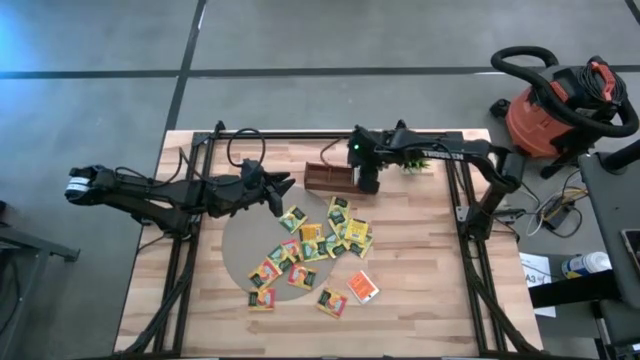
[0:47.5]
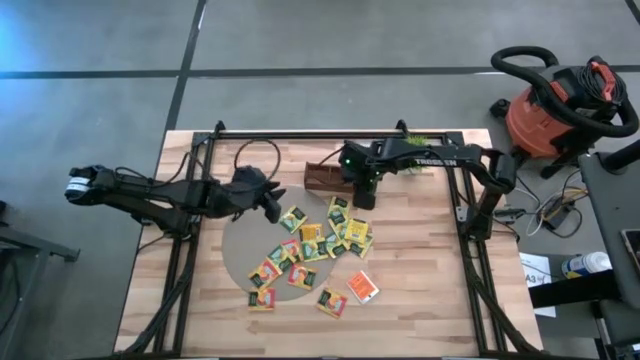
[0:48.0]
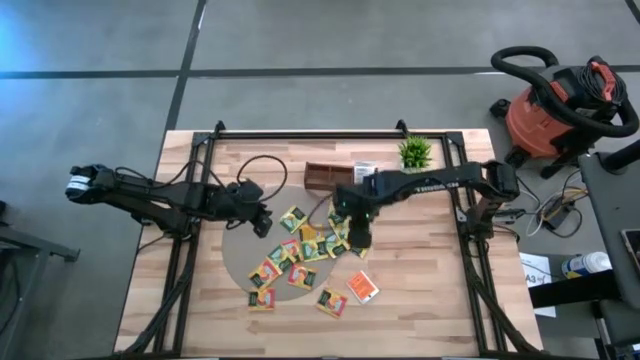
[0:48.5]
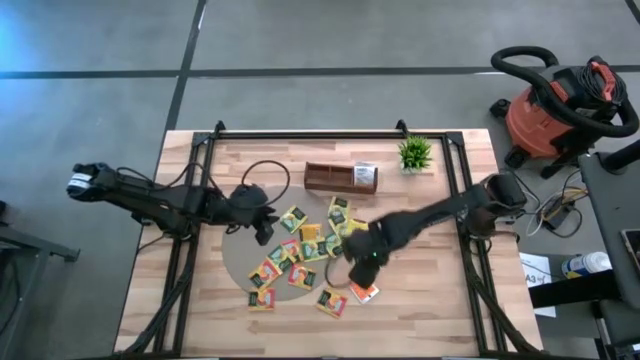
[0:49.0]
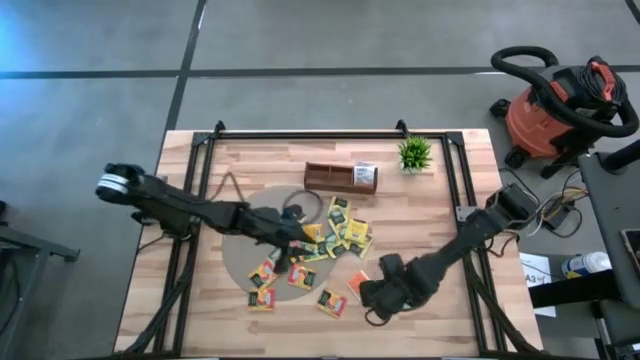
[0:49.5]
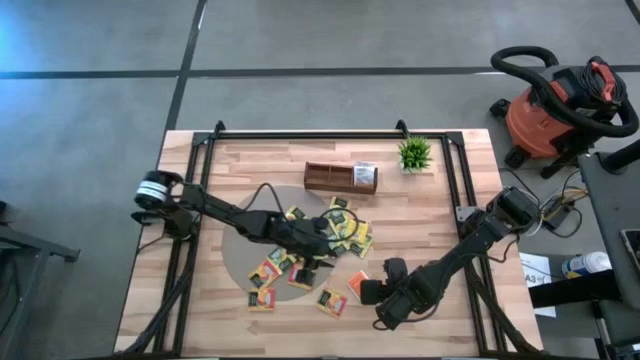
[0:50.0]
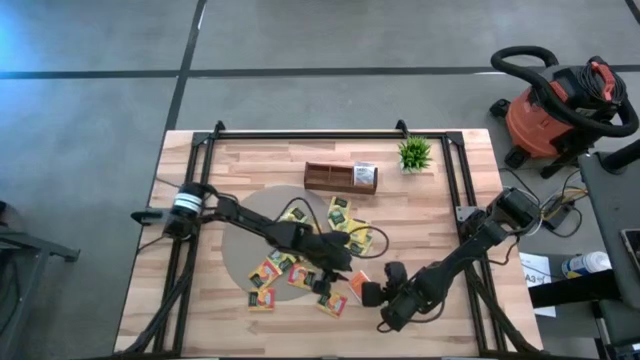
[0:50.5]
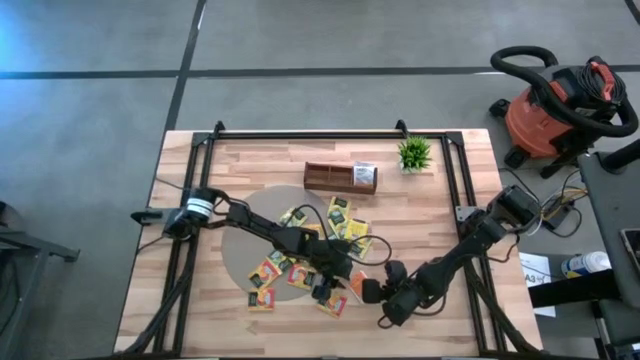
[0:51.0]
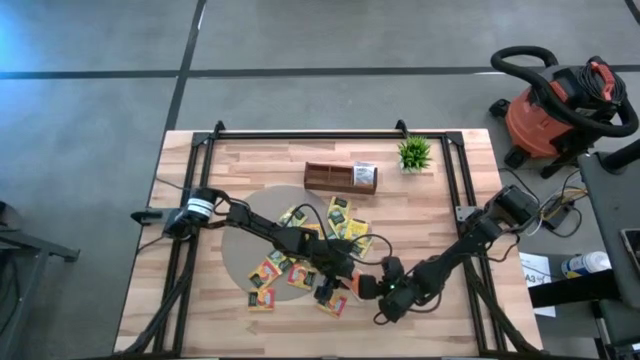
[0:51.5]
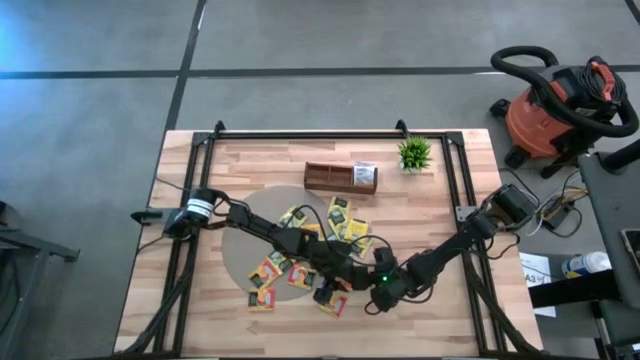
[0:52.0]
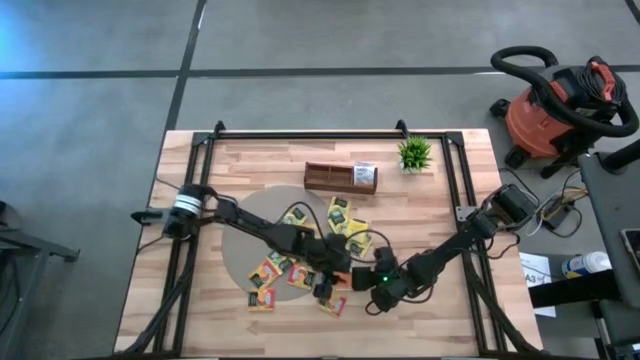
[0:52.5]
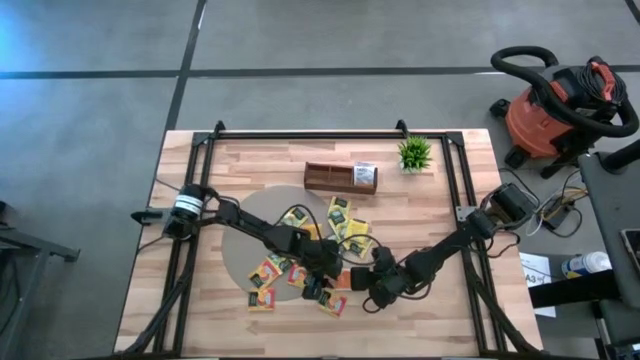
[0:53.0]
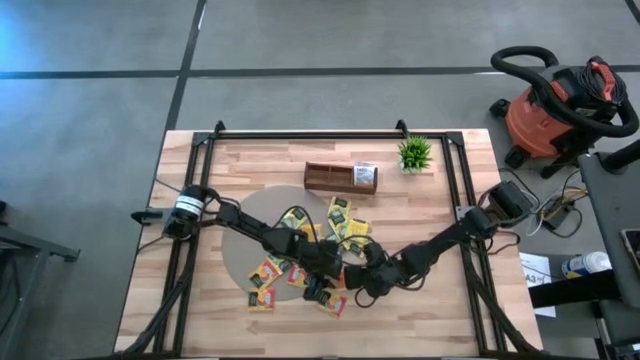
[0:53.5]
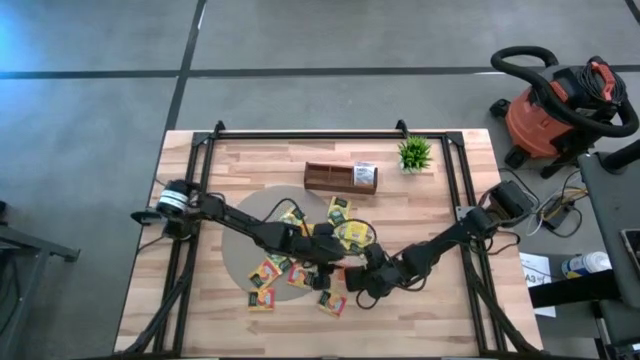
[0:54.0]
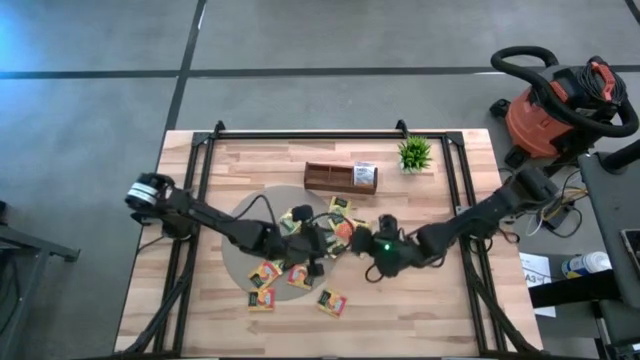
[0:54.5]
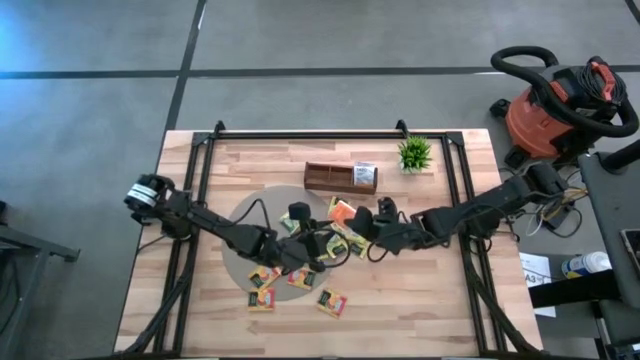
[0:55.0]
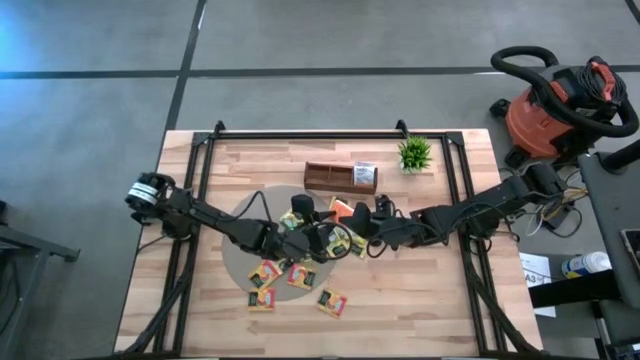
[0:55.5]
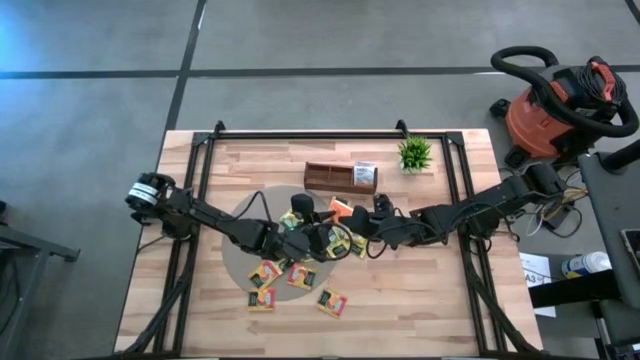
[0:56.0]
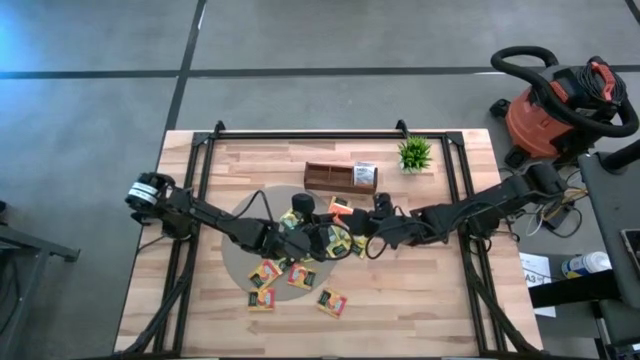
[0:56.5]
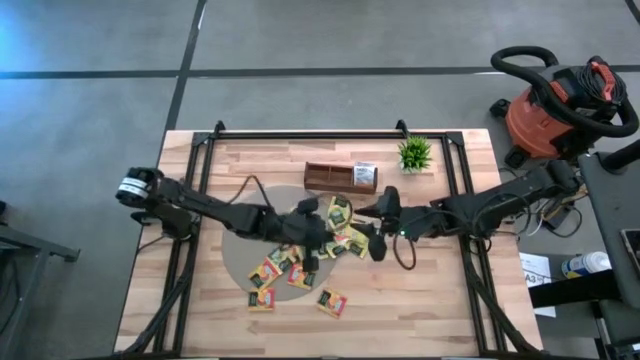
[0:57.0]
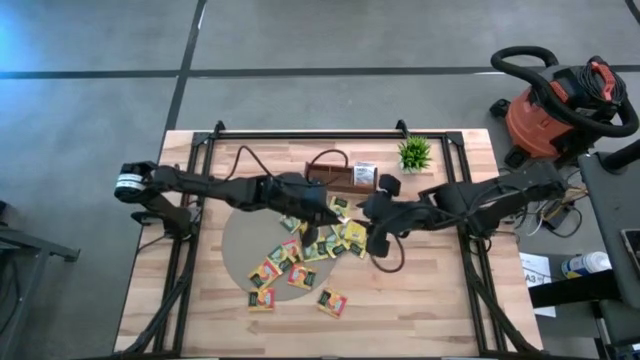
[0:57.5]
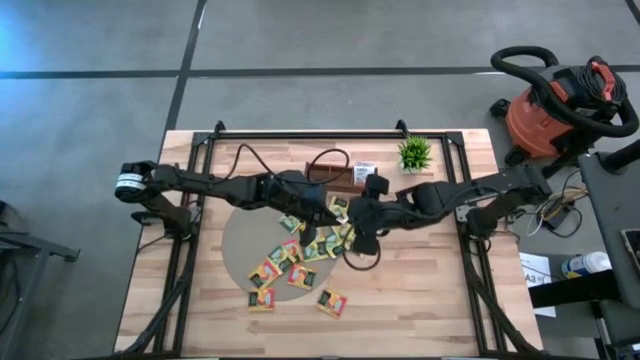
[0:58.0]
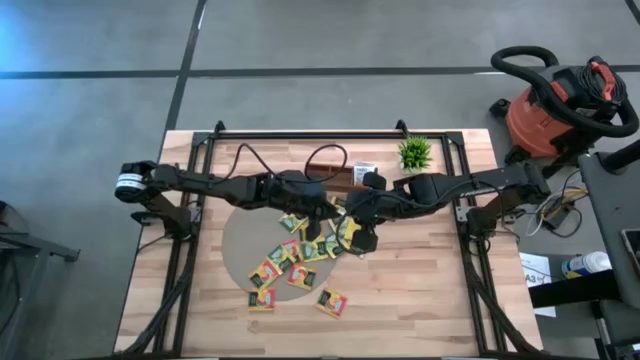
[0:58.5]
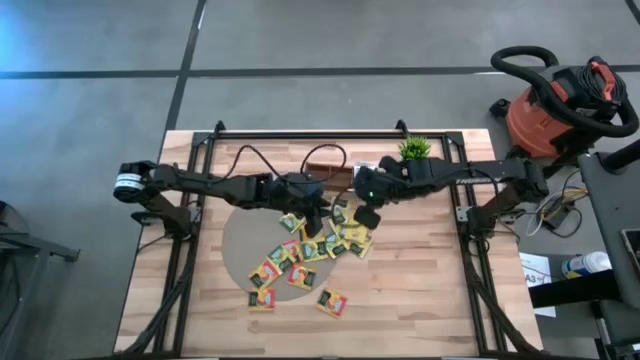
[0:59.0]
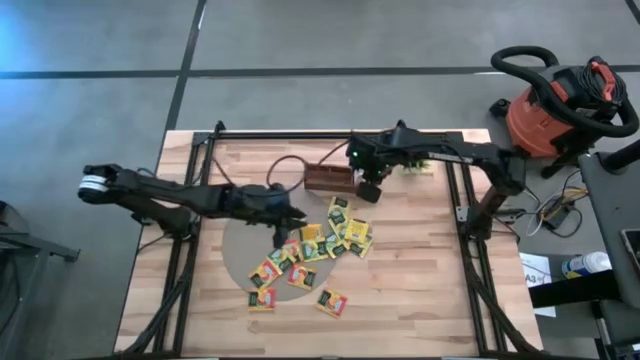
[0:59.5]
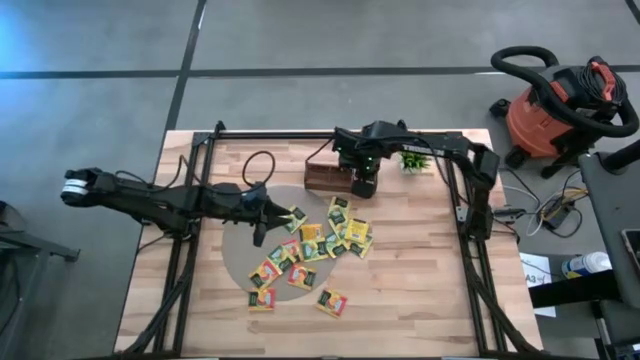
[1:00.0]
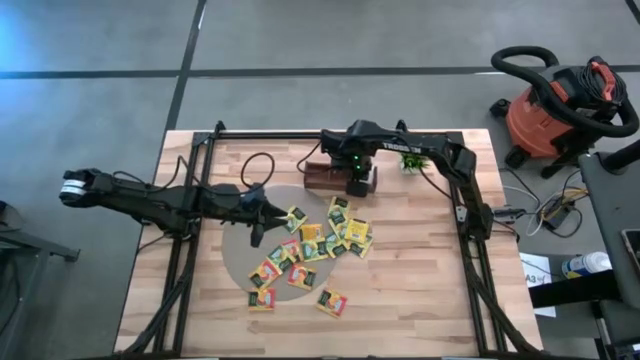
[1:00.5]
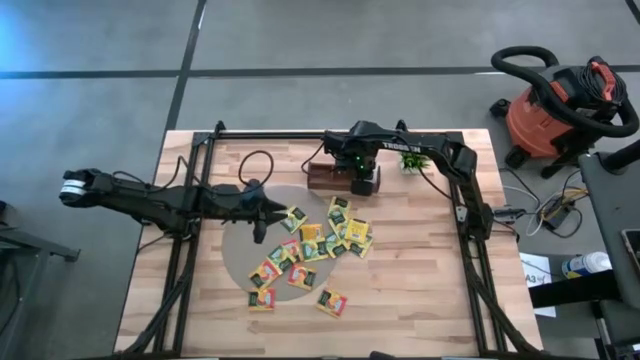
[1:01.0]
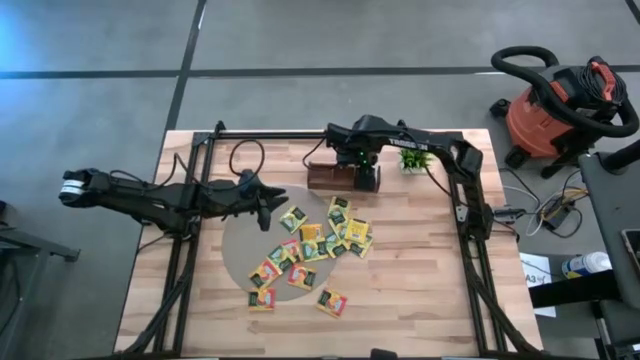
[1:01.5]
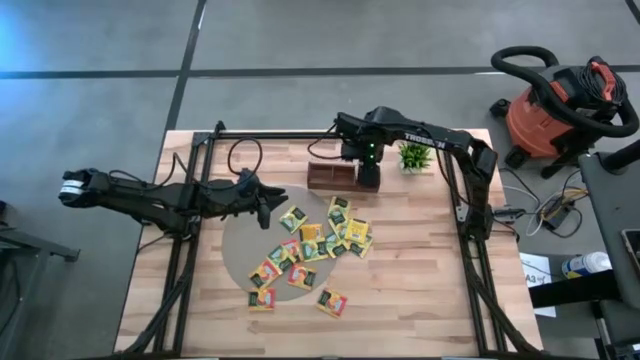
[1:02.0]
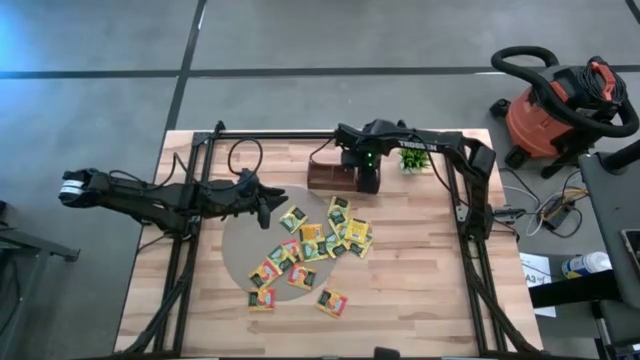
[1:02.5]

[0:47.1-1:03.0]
Task: Pick & Place Tea
Put the orange tea sachet into the right compartment of the wooden organizer

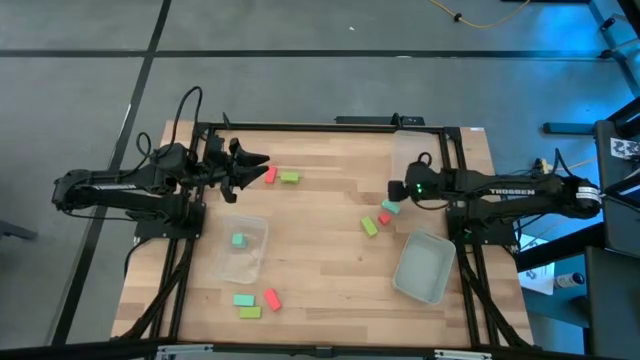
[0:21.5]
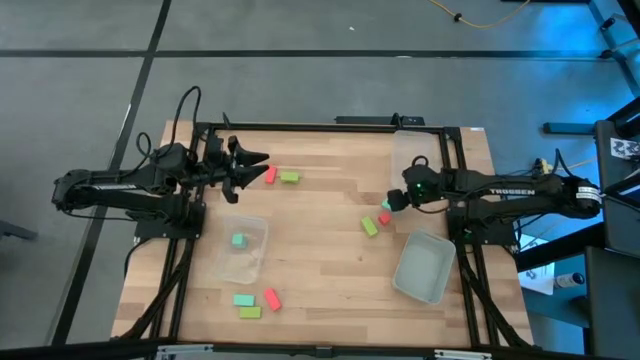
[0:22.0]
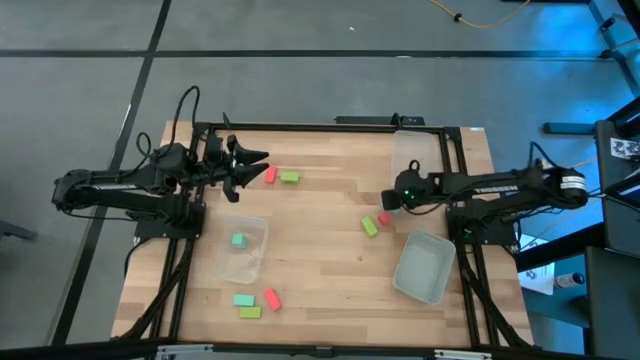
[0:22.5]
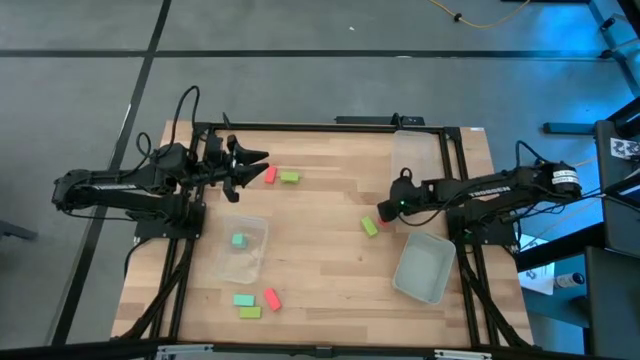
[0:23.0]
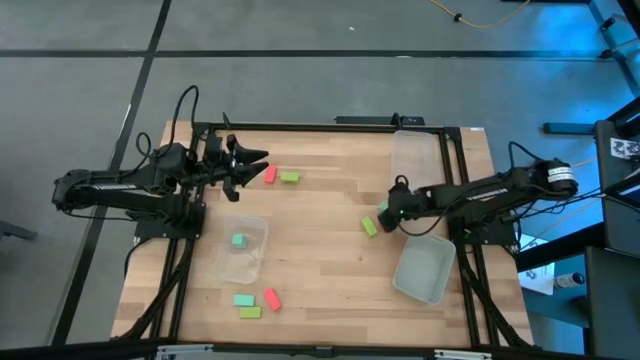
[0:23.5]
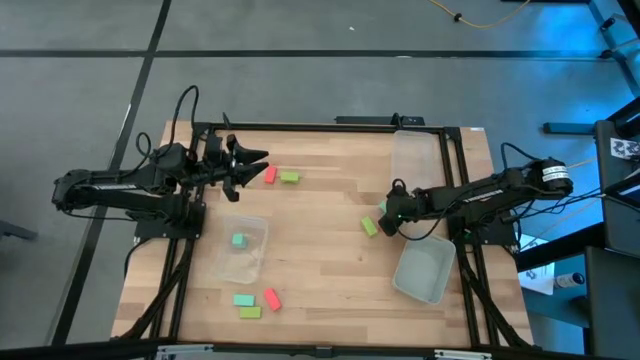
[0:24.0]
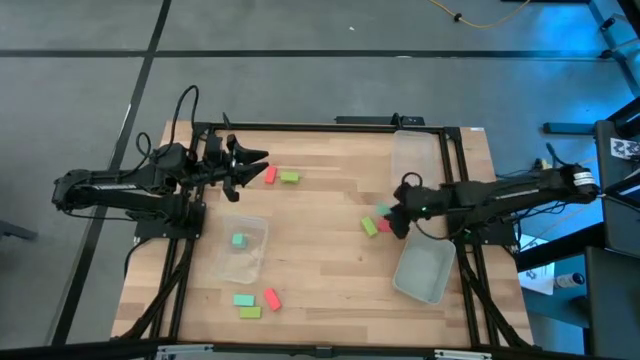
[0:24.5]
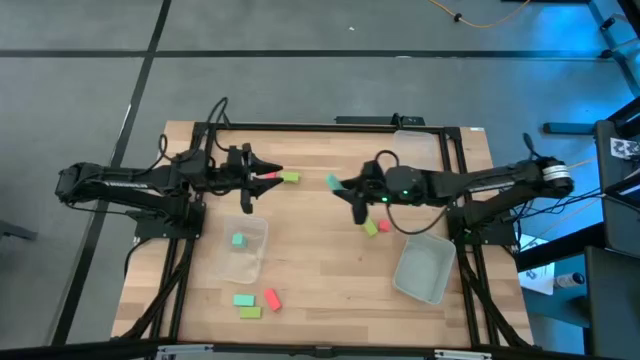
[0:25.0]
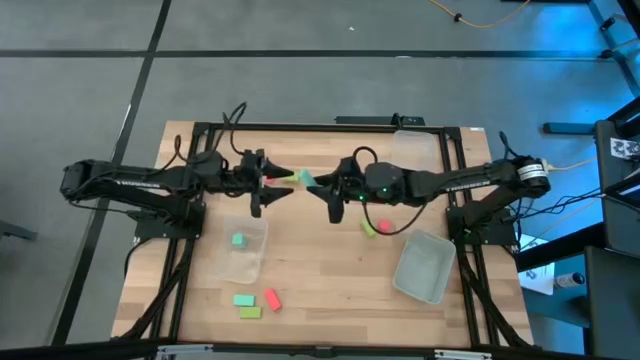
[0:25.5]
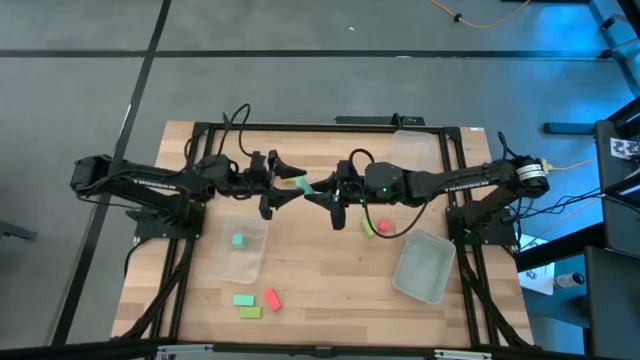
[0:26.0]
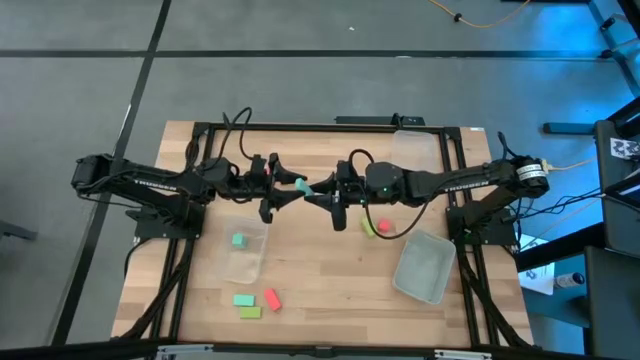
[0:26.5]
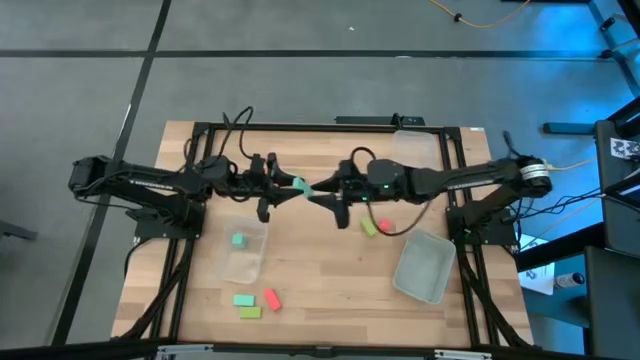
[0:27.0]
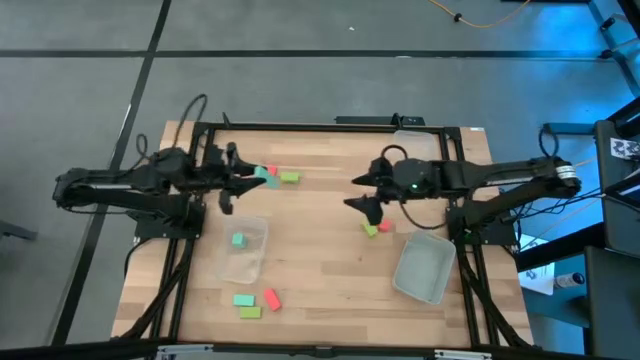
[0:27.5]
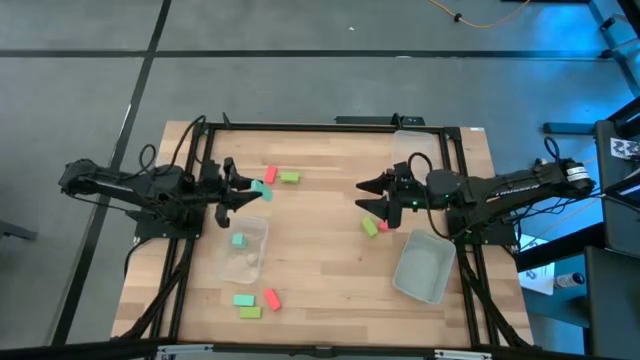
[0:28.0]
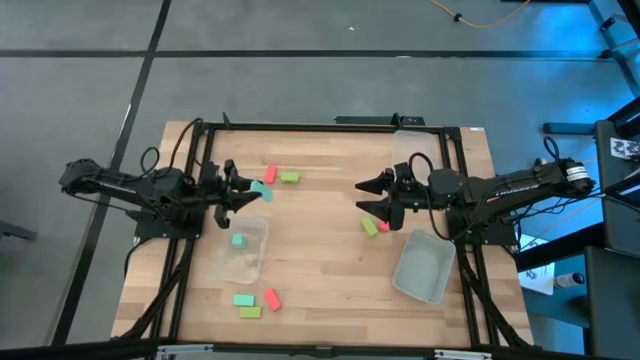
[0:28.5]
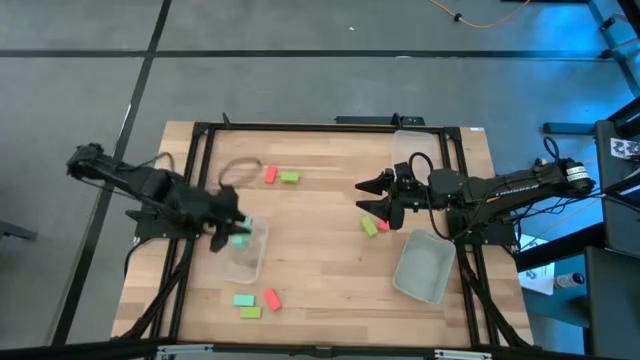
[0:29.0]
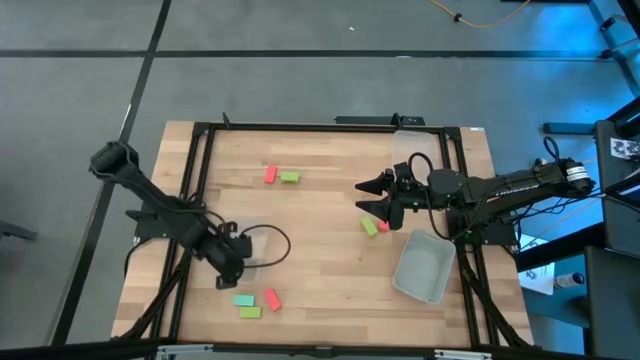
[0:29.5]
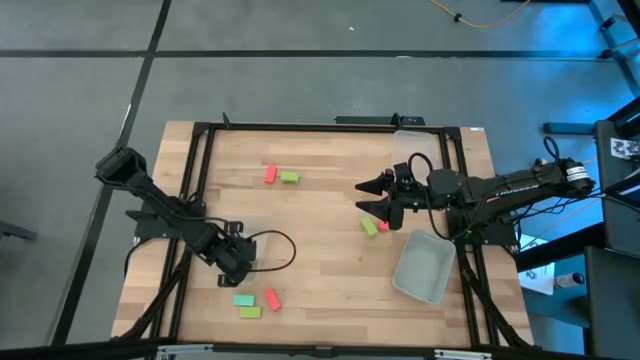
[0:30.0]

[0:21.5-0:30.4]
Task: Sort & place blocks by color
Put the right blue block into the left transparent bin
